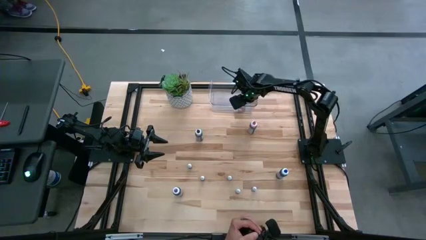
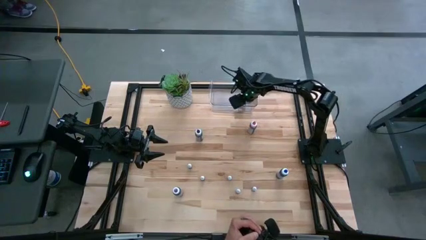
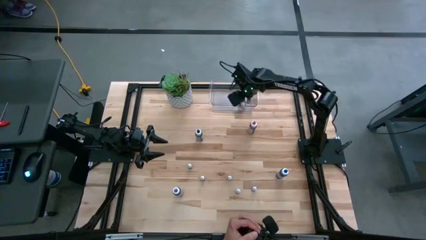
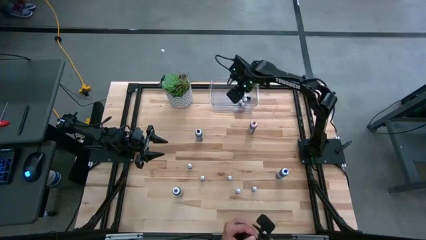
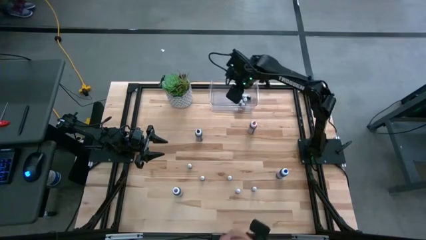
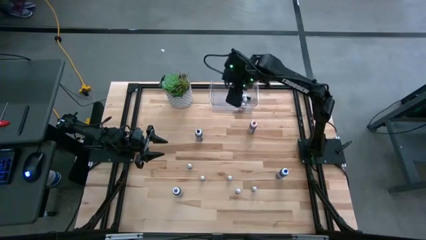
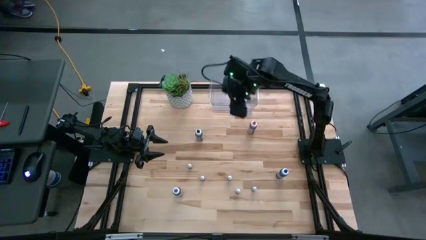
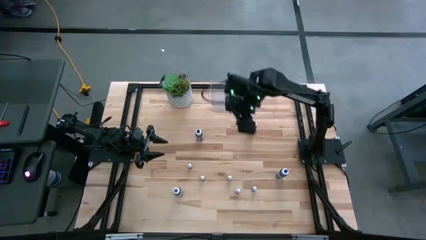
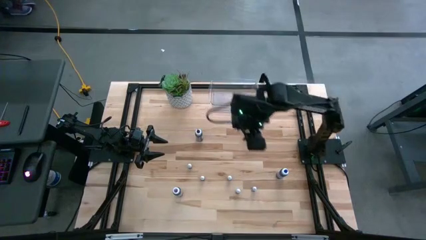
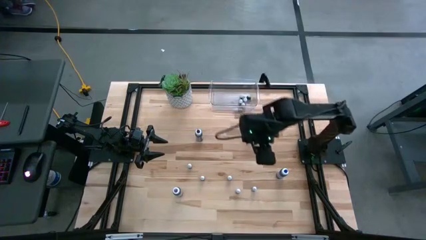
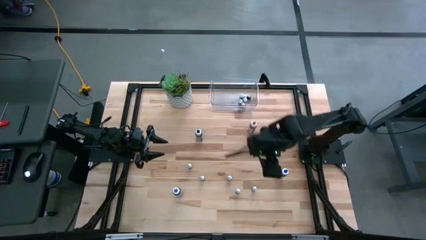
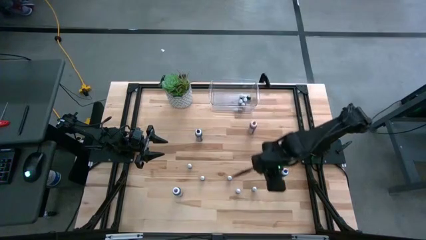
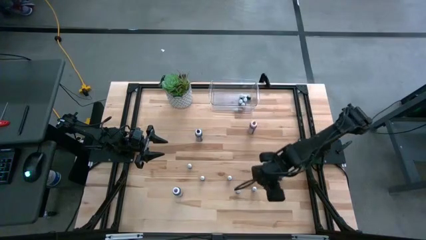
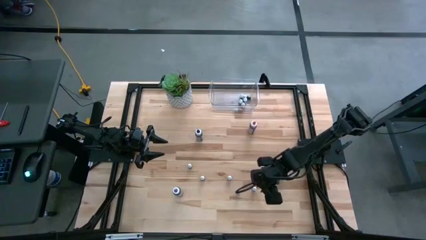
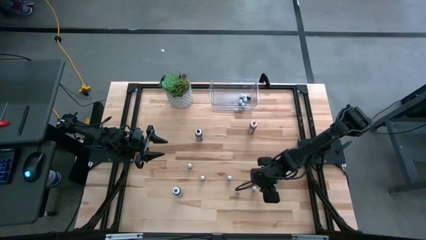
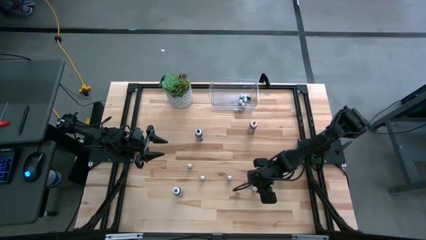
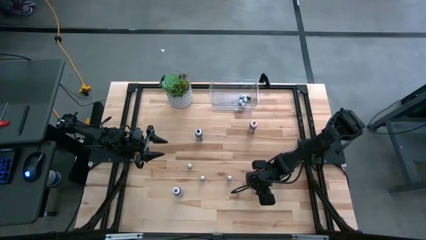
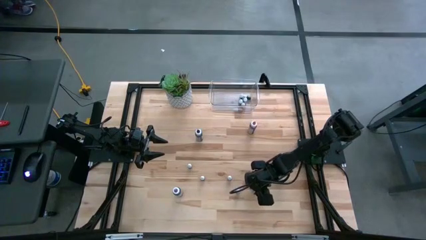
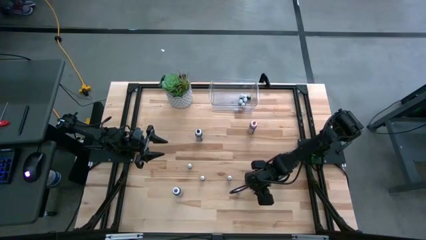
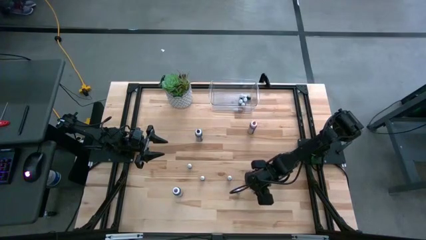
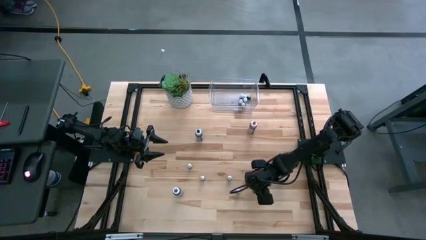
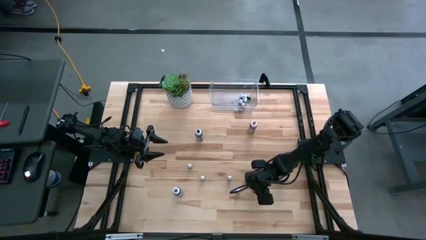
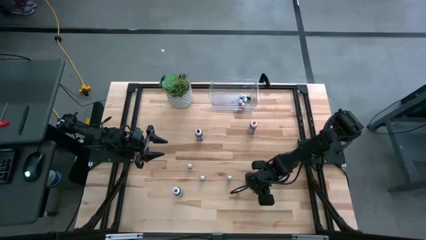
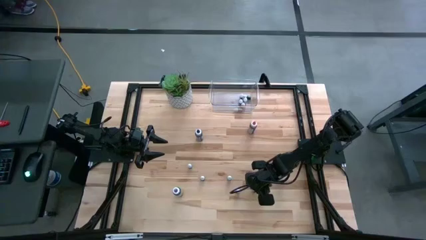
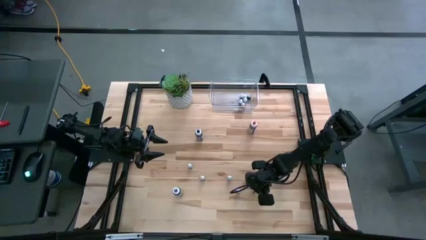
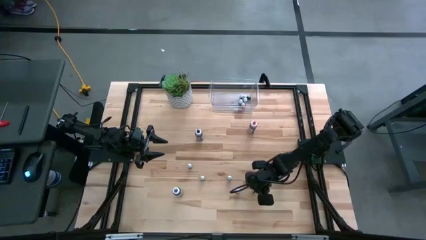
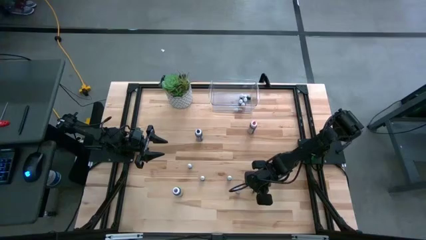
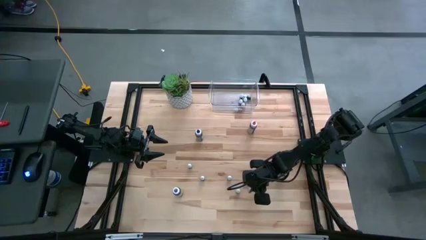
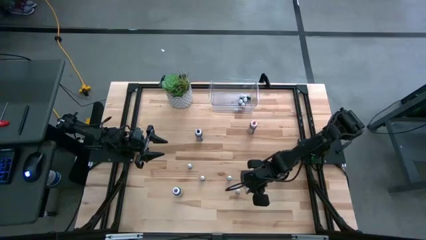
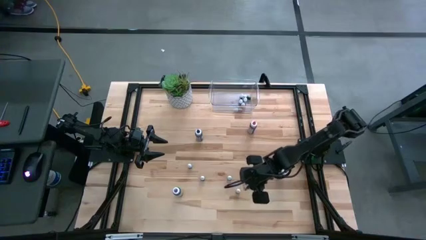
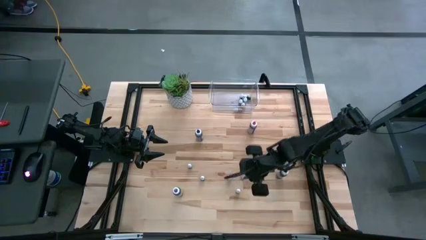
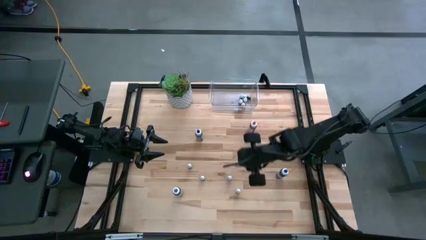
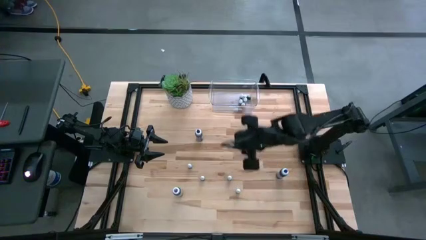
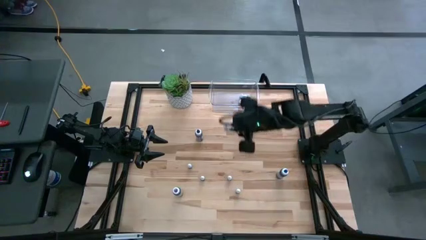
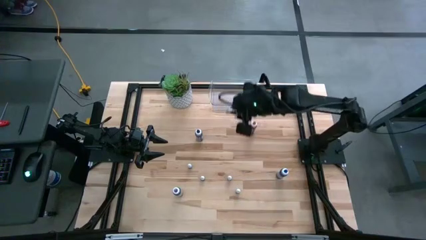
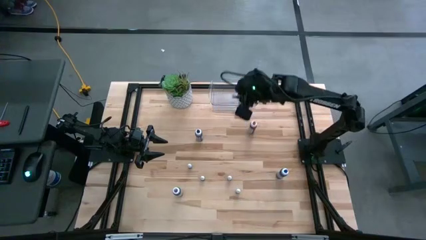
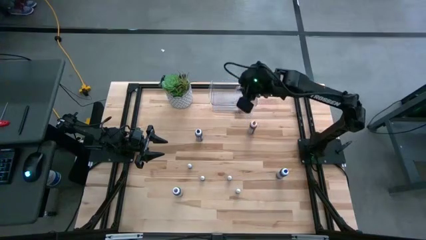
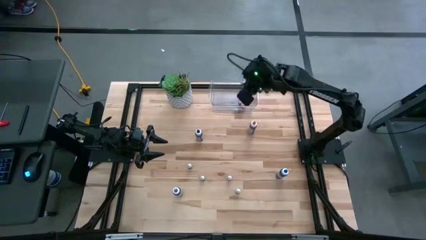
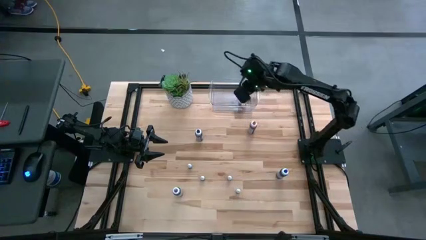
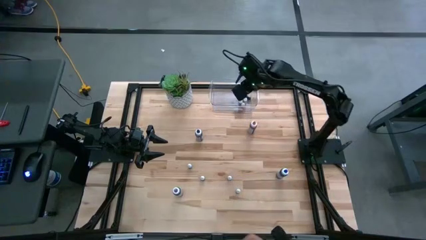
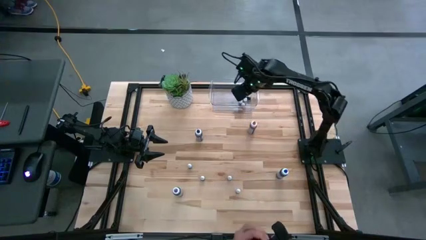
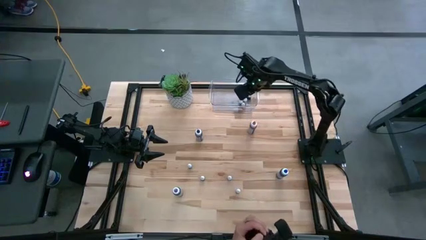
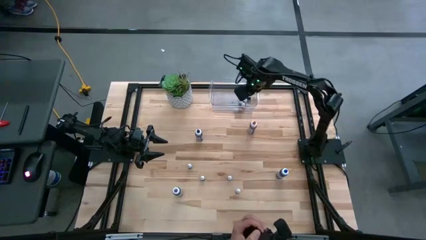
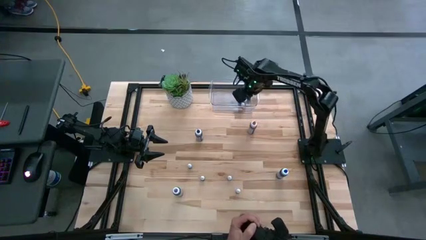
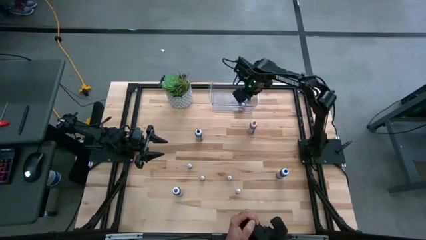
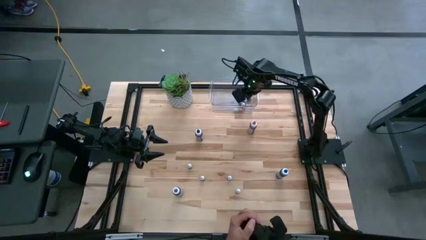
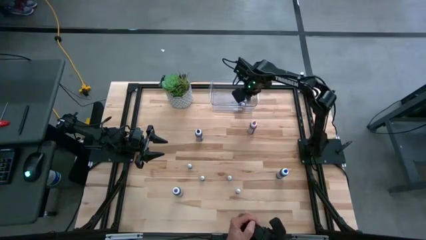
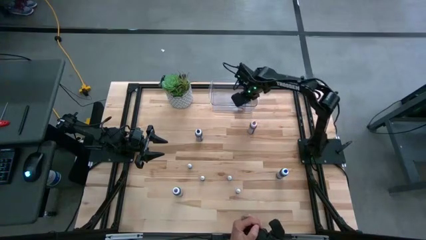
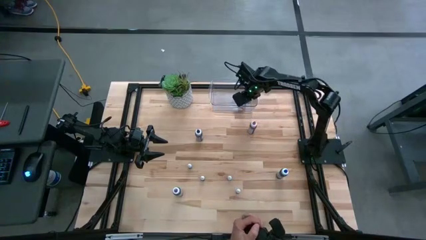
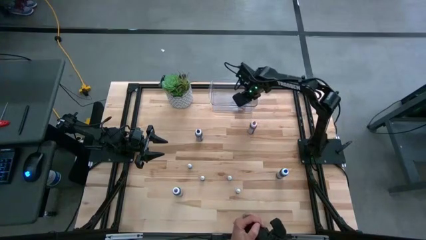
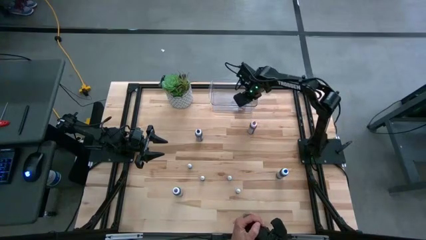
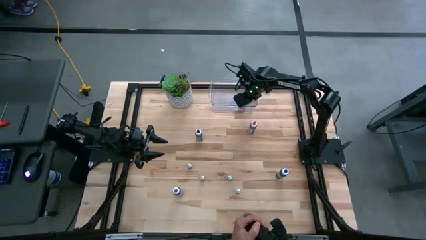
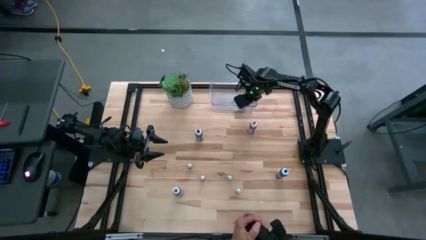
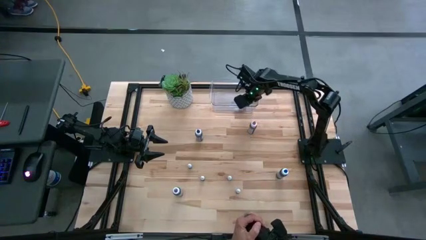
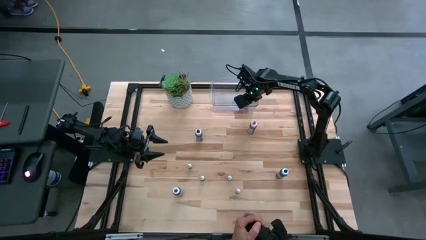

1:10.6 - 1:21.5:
Task: Pick & Place food coloring
Put the right small purple food coloring bottle into the bin
